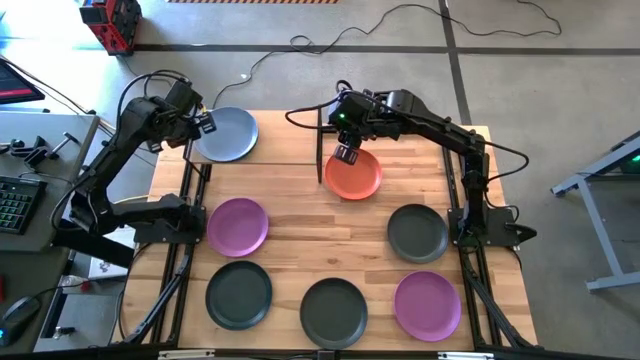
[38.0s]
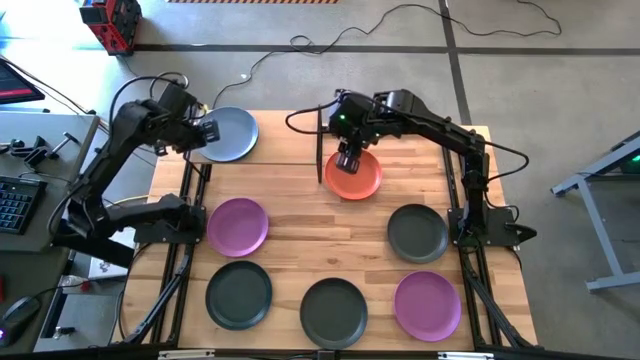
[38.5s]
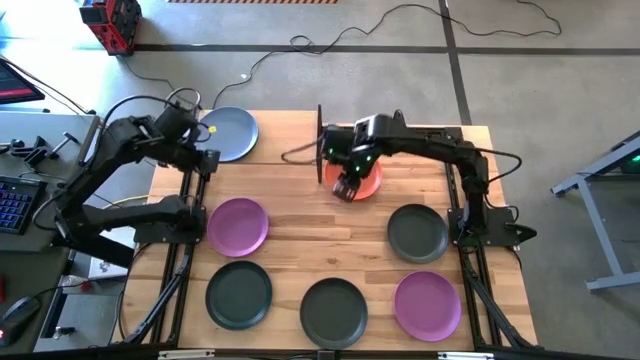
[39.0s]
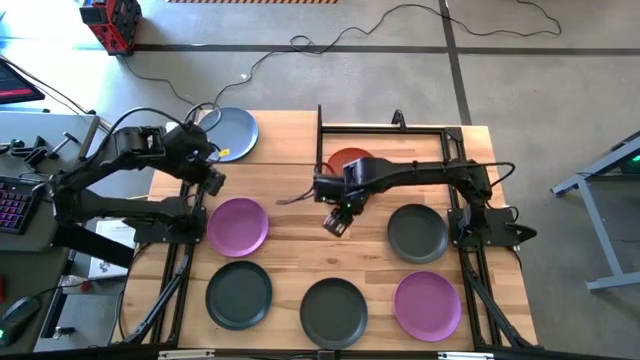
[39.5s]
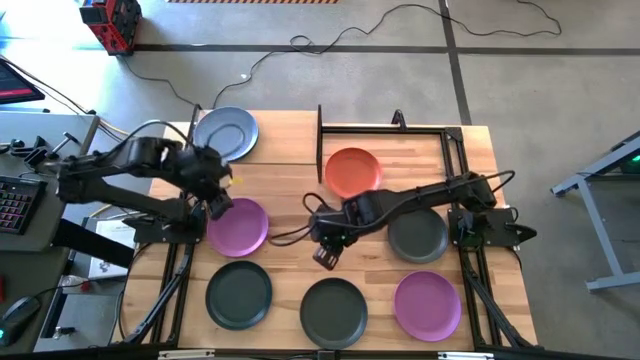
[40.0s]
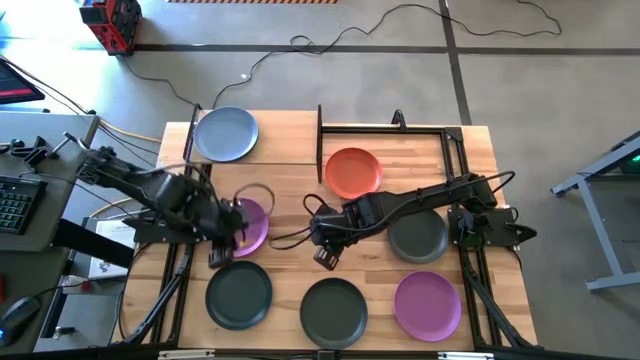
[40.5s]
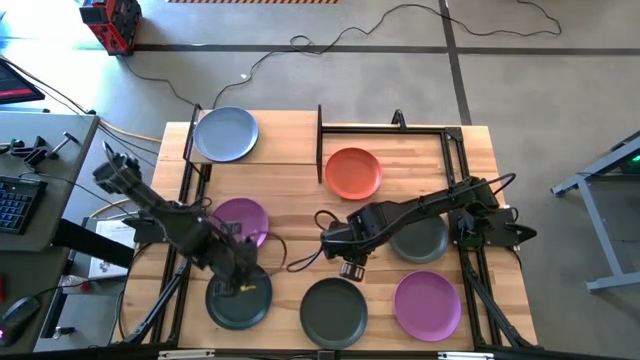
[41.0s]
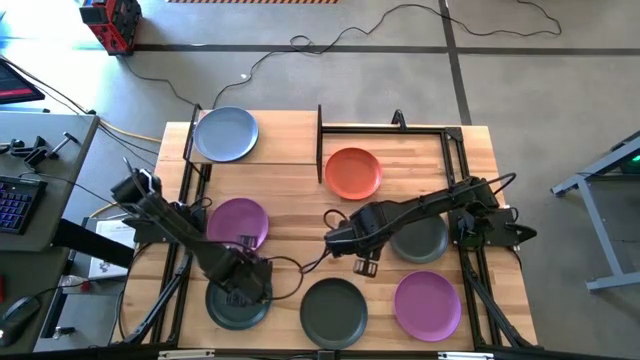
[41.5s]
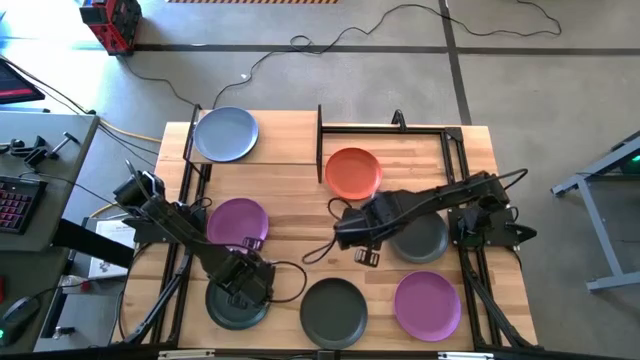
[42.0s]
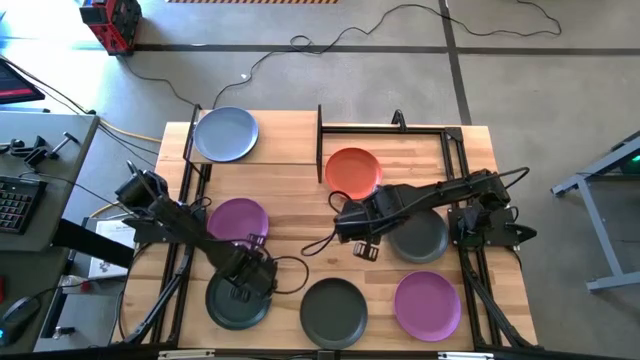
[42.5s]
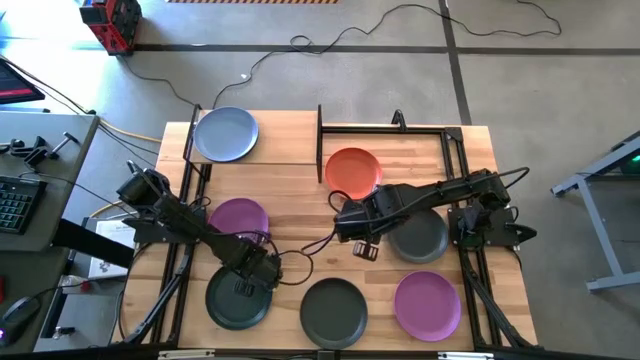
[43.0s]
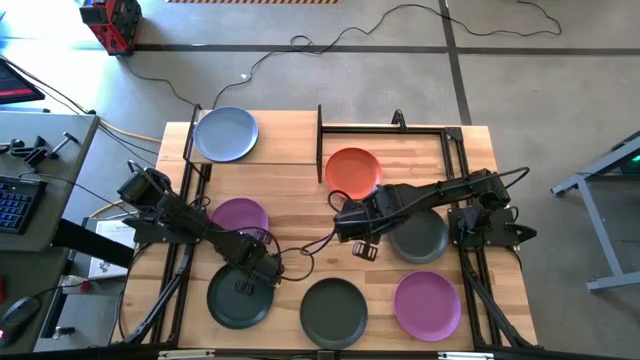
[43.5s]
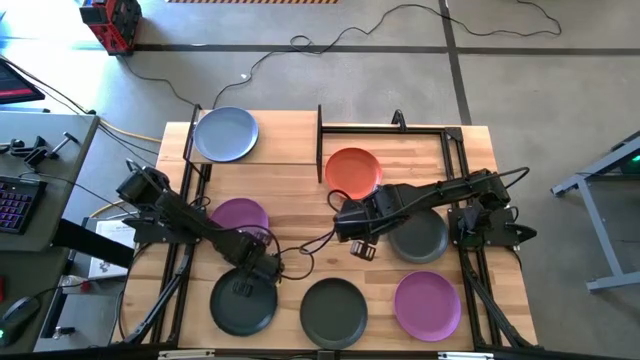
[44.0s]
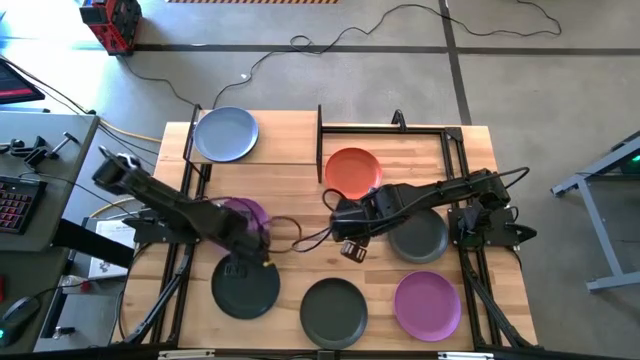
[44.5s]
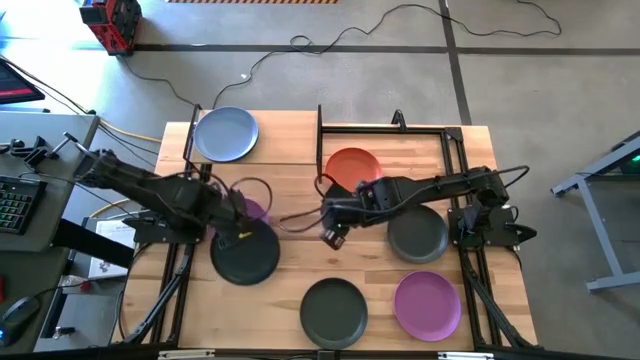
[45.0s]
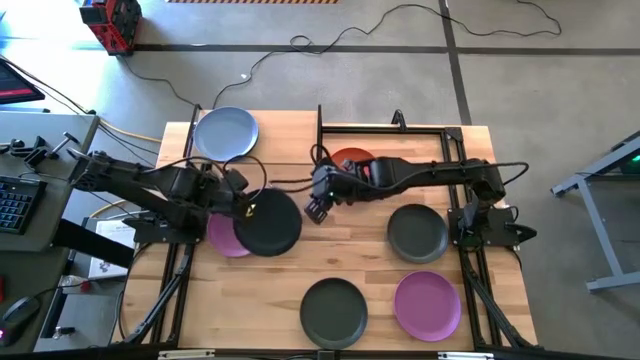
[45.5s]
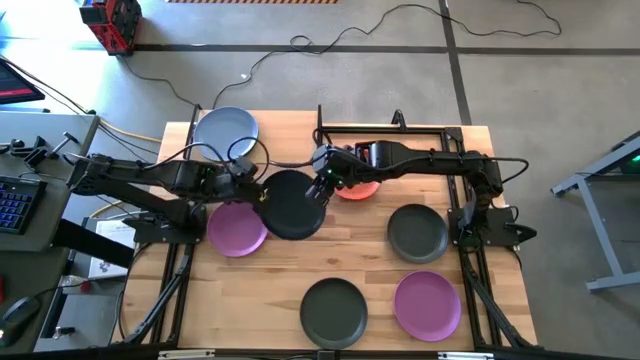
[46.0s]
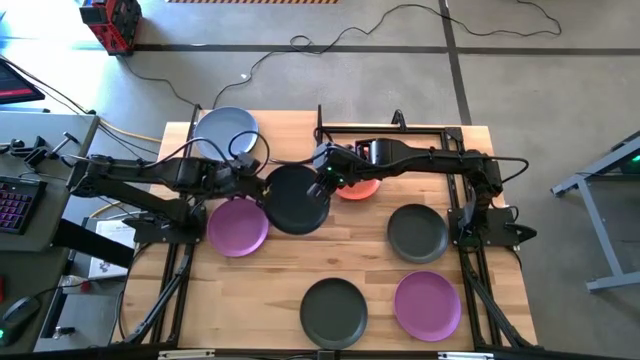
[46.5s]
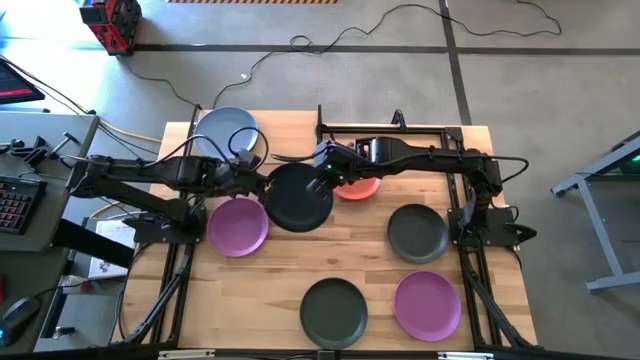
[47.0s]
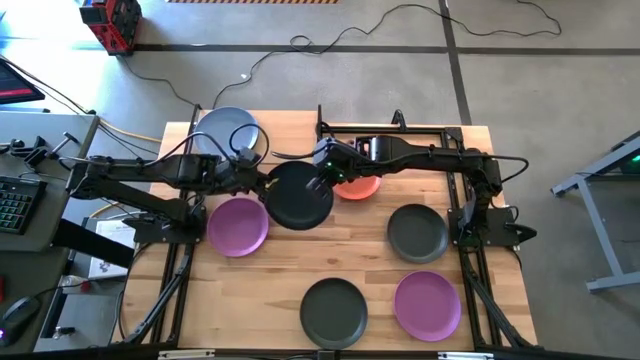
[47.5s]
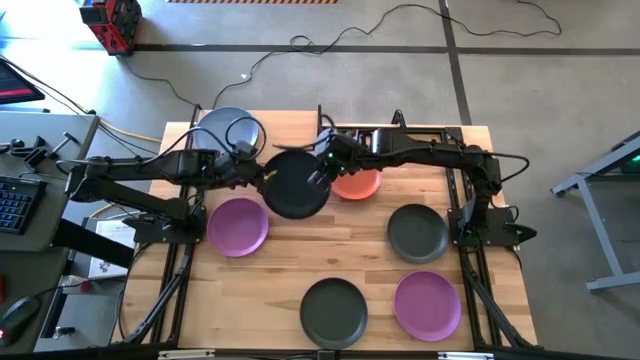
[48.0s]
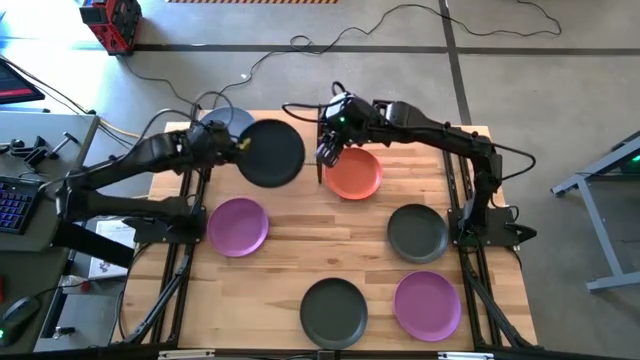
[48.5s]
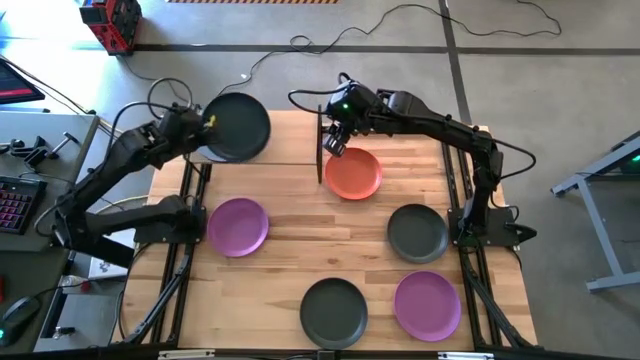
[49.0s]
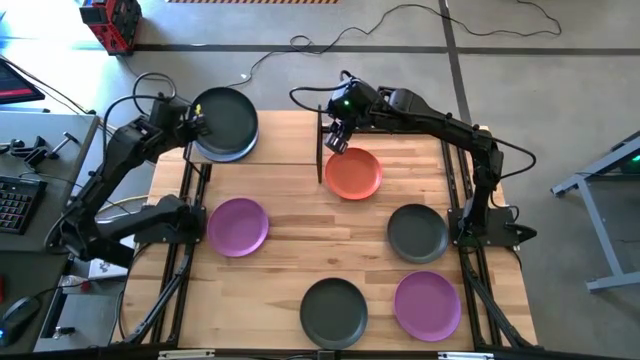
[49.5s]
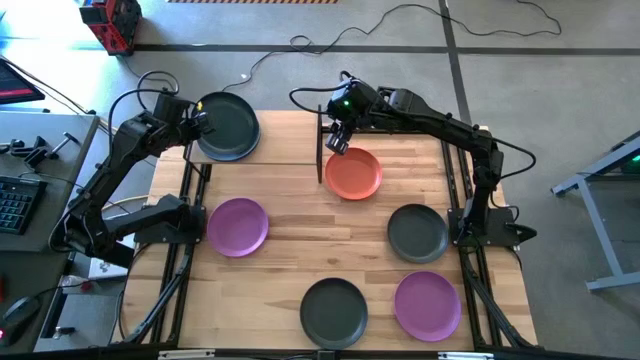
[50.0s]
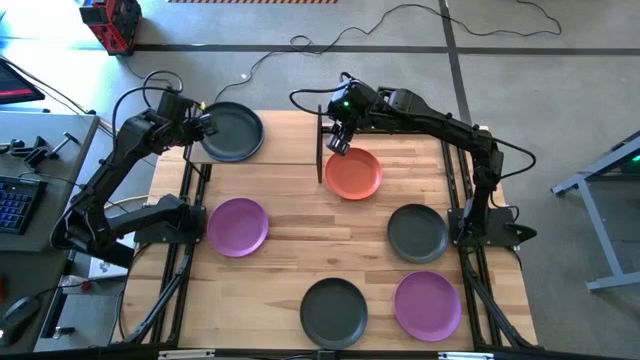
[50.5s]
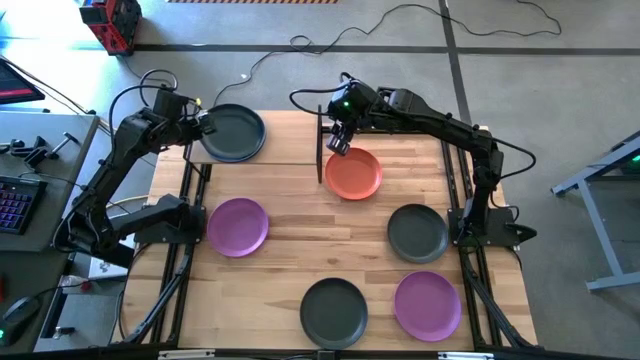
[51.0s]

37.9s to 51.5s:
Task: Place and stack plates onto a shelf
Stack the left black plate on top of the blue plate on the shelf

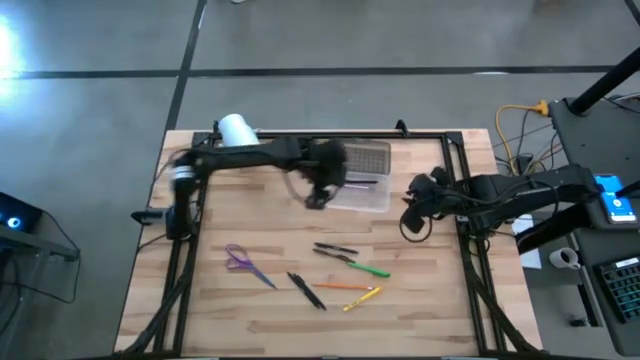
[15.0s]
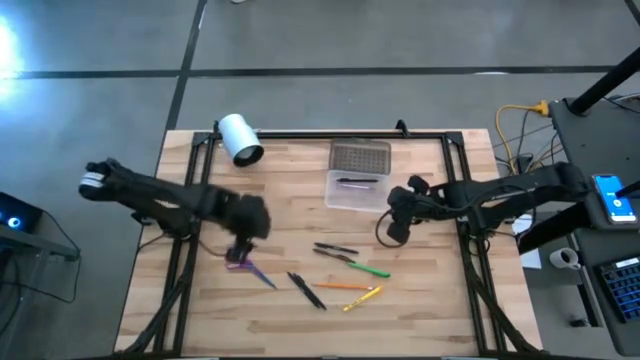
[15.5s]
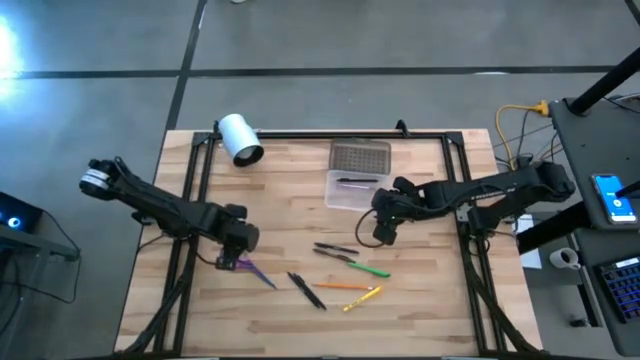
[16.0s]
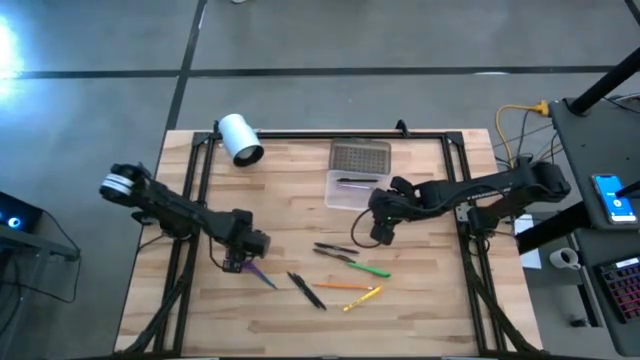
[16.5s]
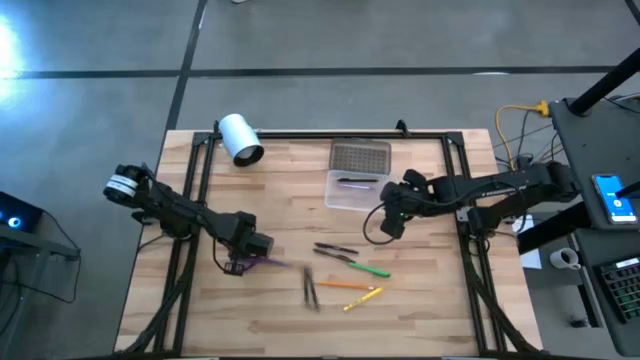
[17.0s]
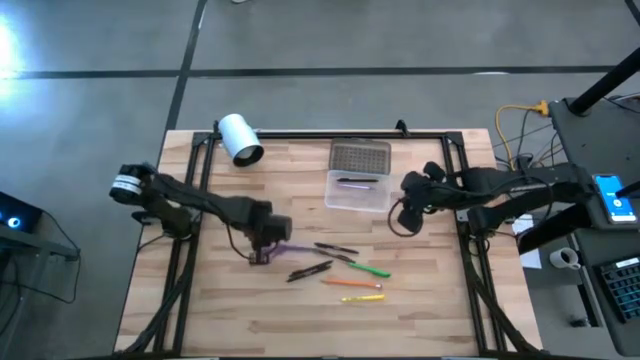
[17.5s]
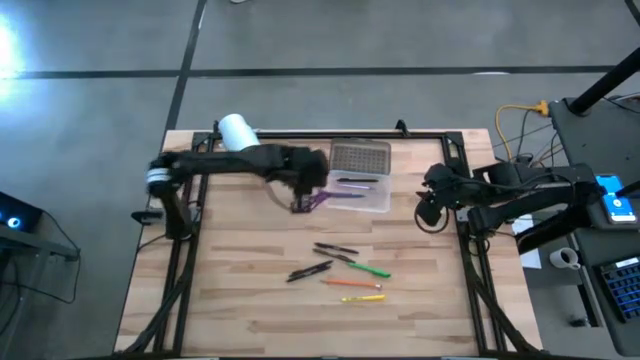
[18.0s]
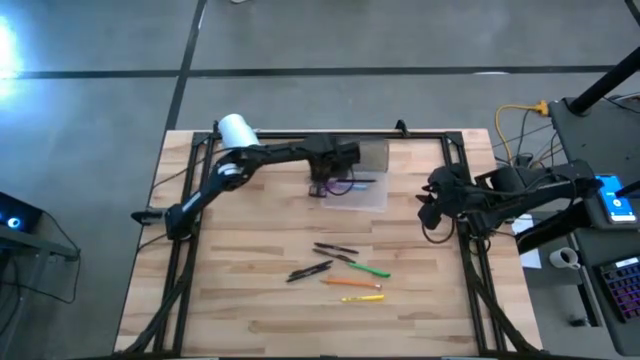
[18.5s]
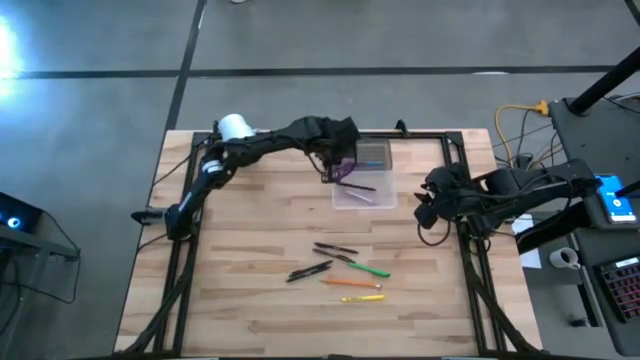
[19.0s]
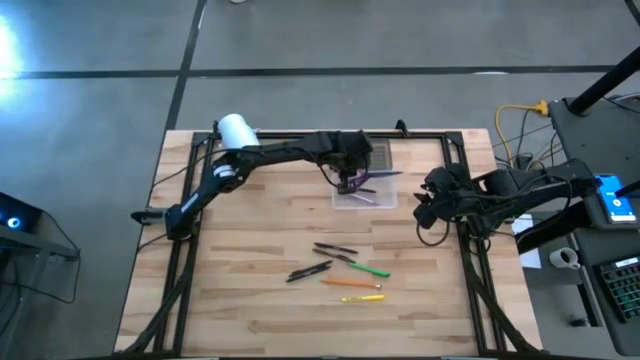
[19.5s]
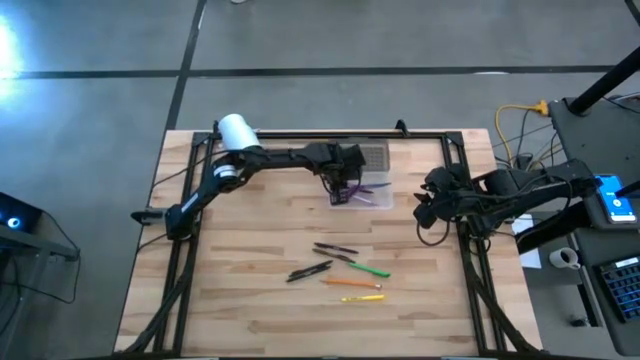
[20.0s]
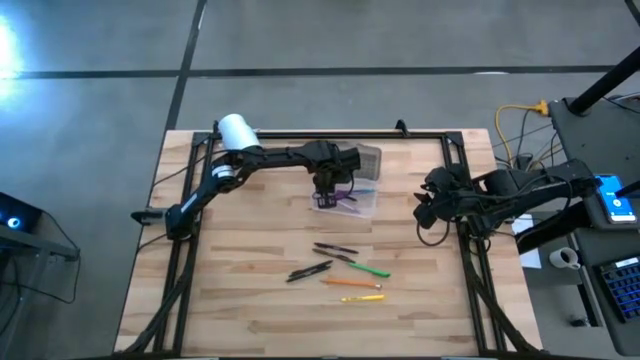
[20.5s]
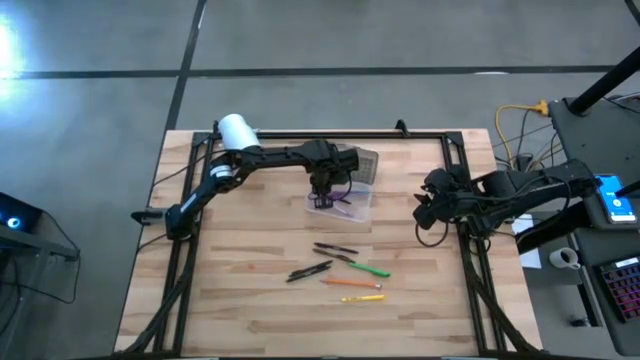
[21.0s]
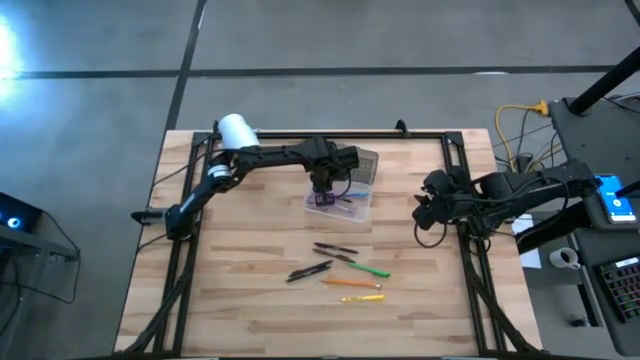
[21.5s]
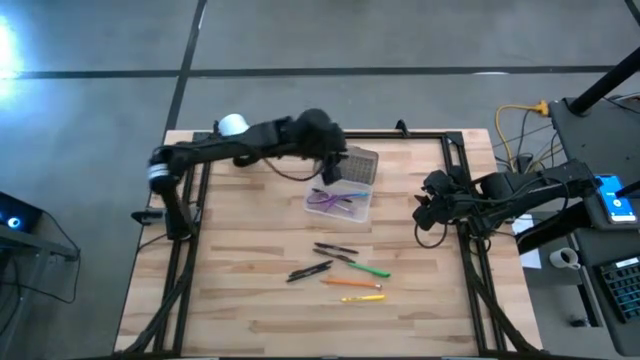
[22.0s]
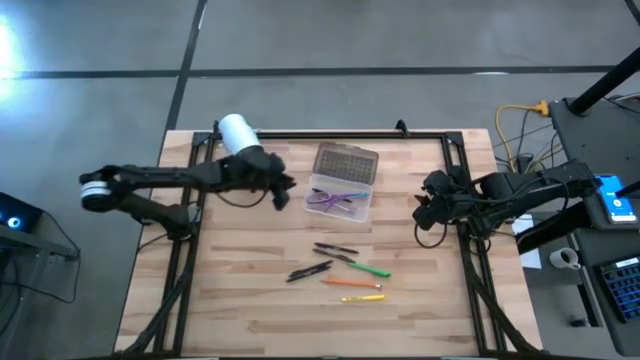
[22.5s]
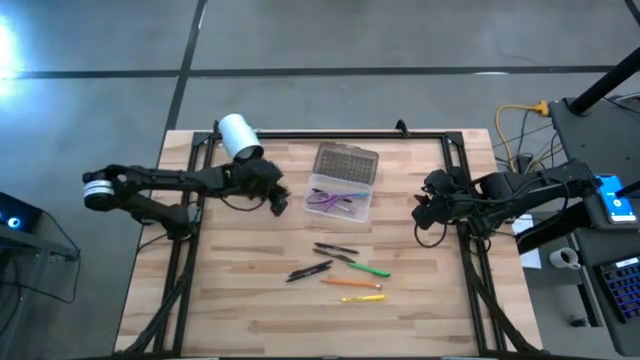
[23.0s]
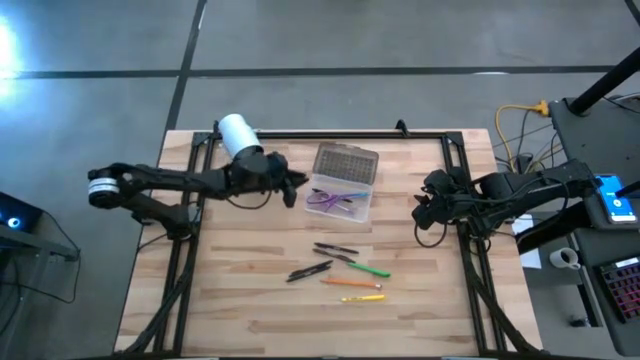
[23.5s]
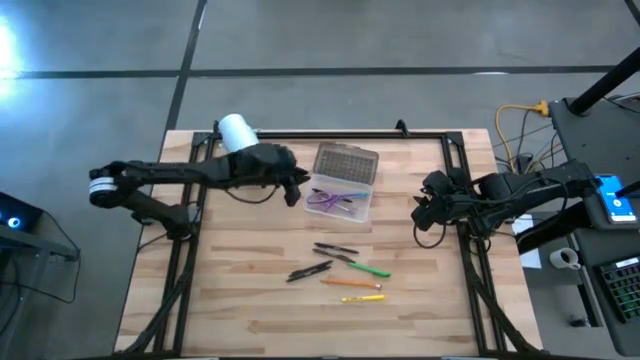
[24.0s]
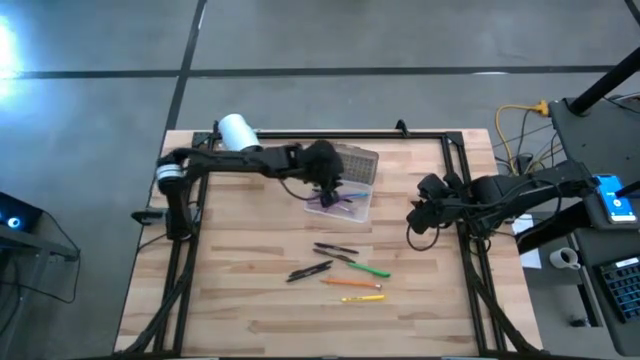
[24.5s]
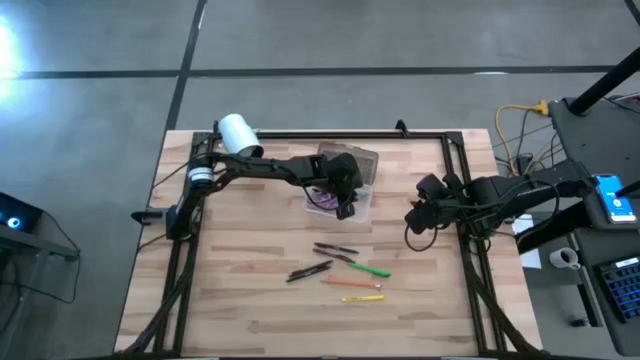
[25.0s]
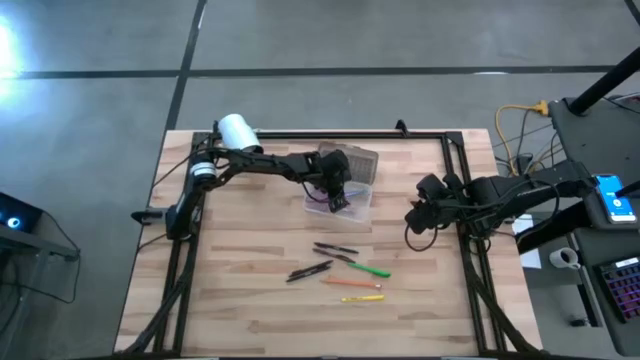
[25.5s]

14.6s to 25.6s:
Task: Pick & place school supplies into a supply box
Put the purple scissors into the supply box
